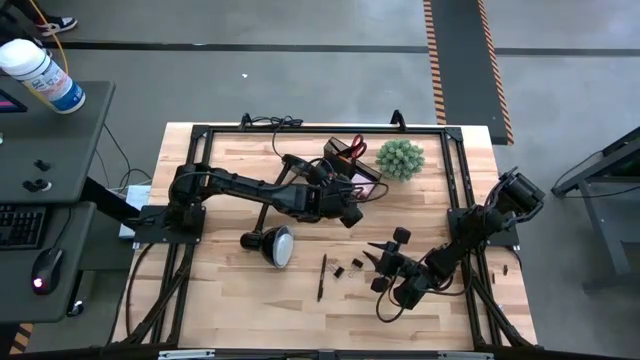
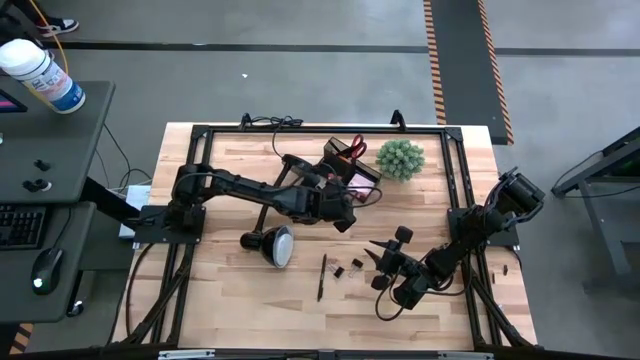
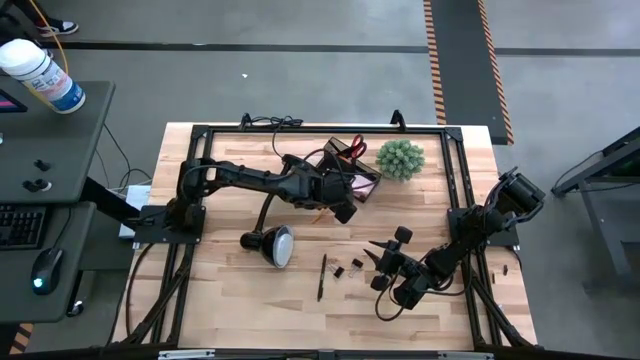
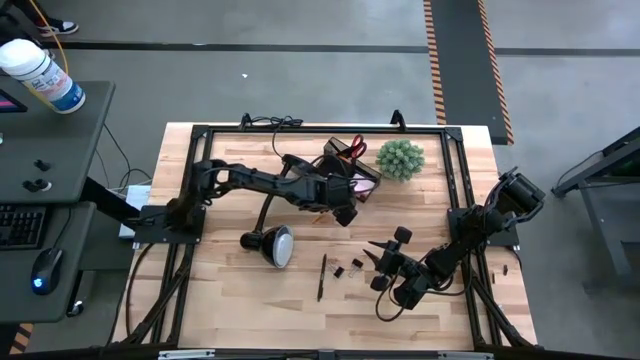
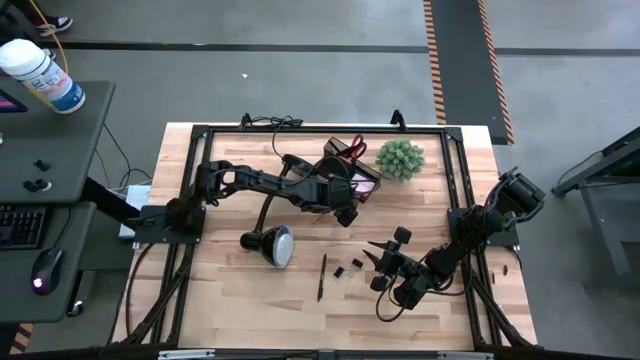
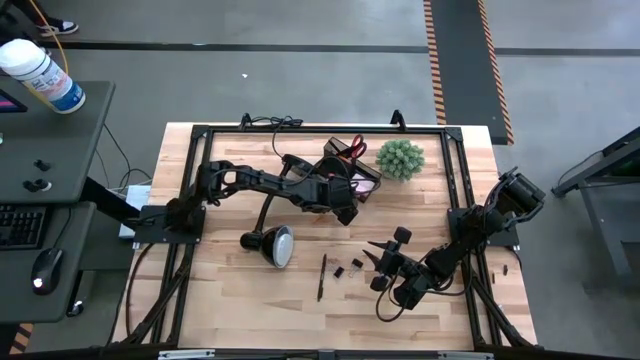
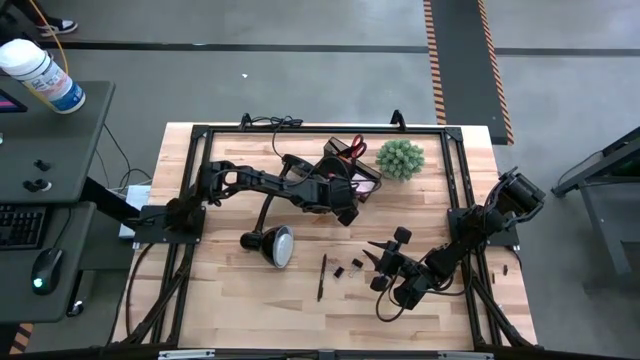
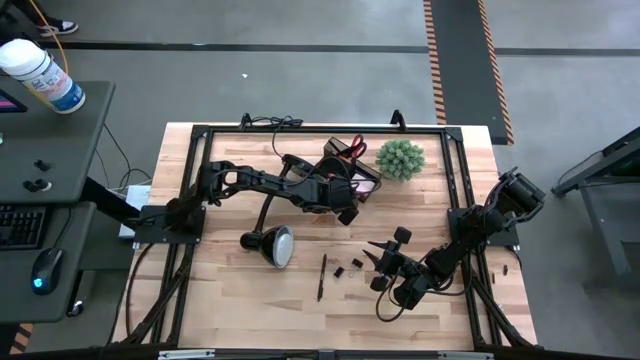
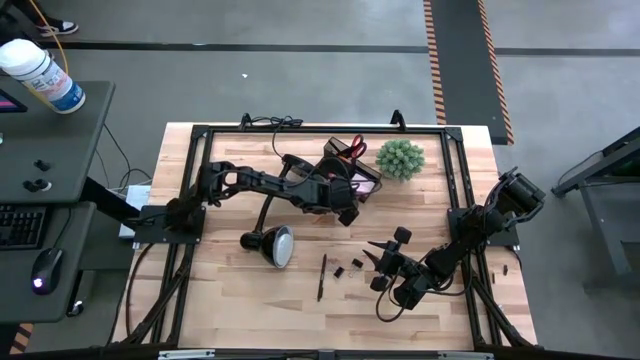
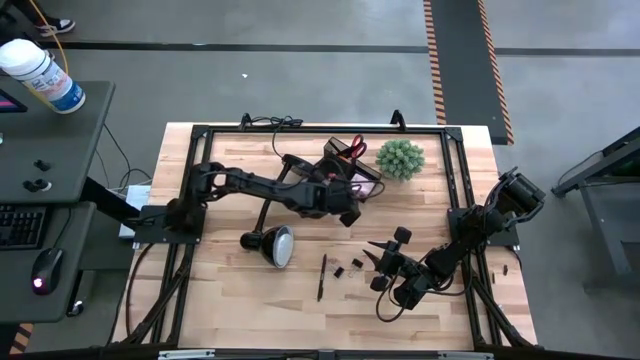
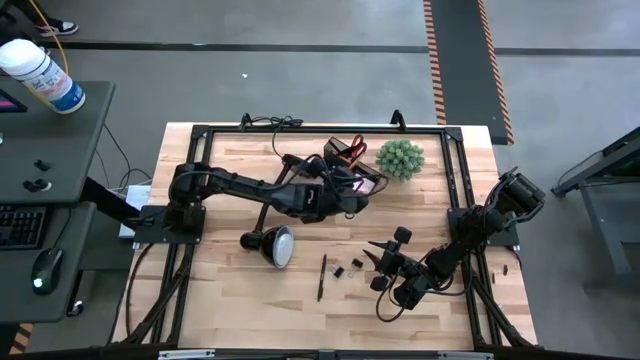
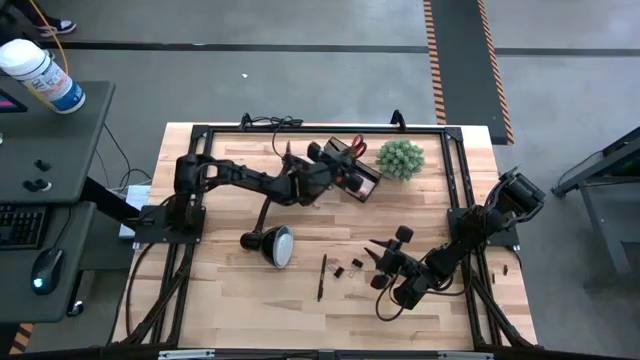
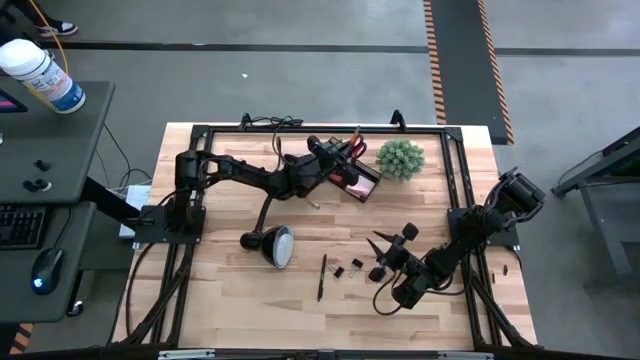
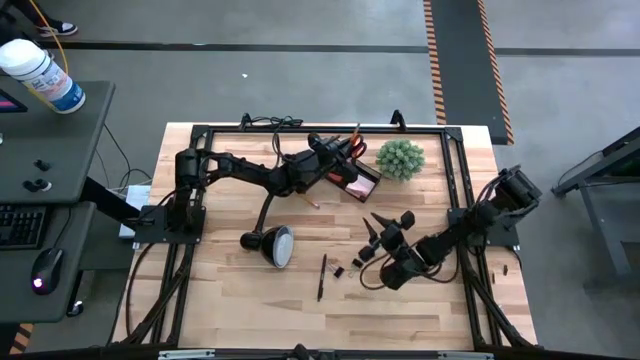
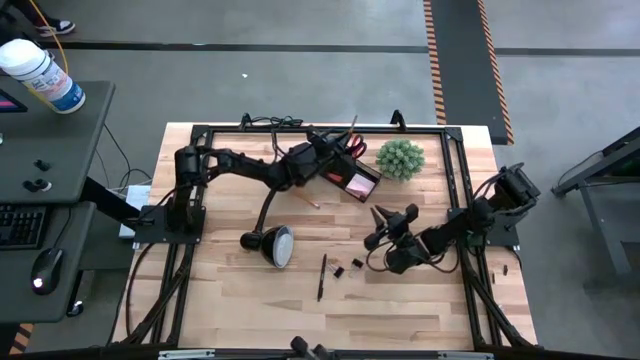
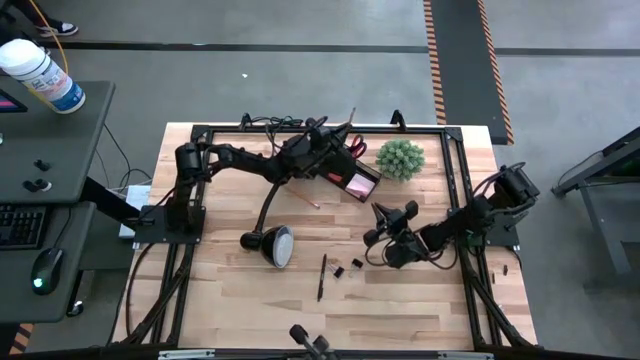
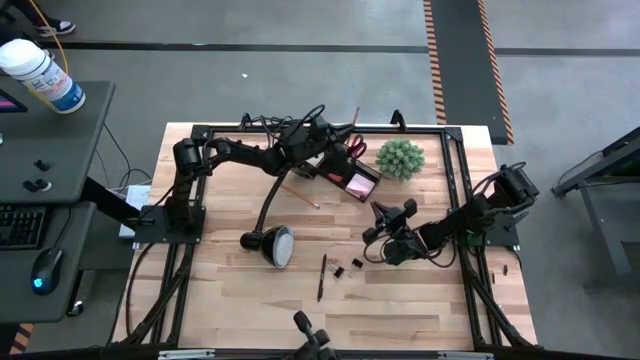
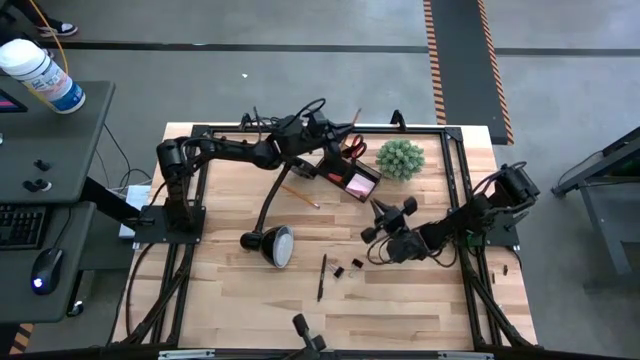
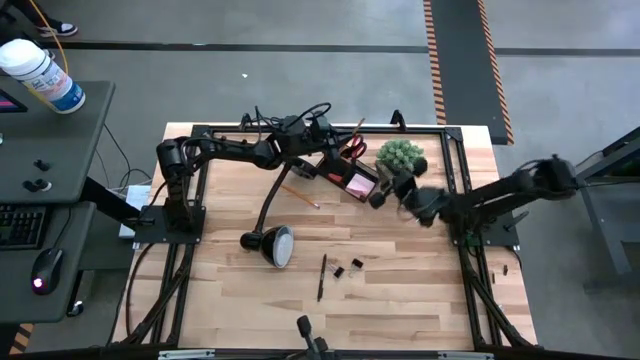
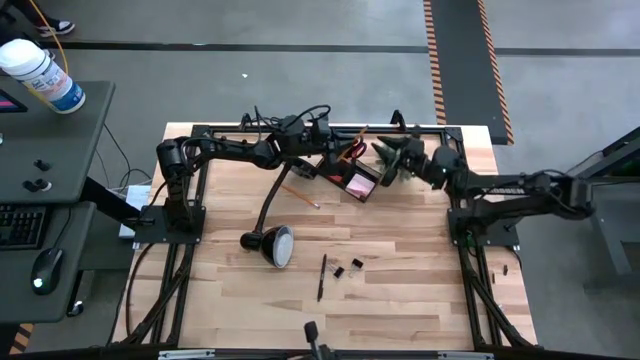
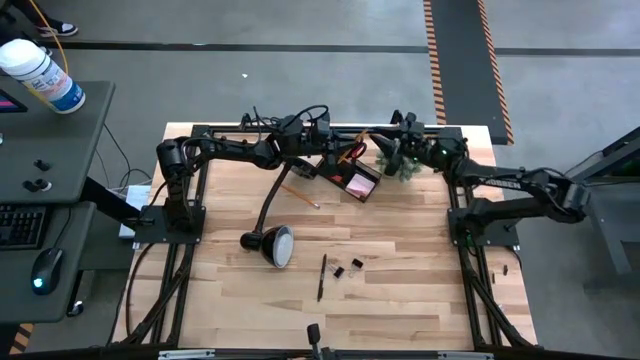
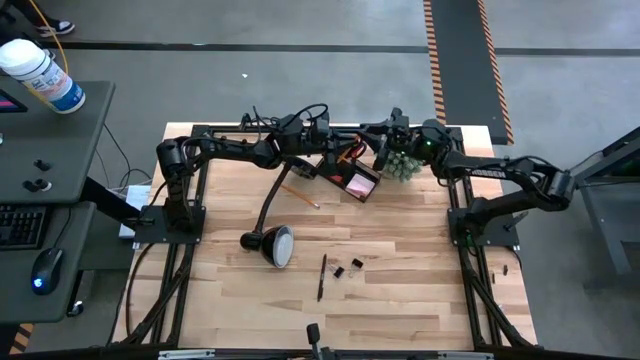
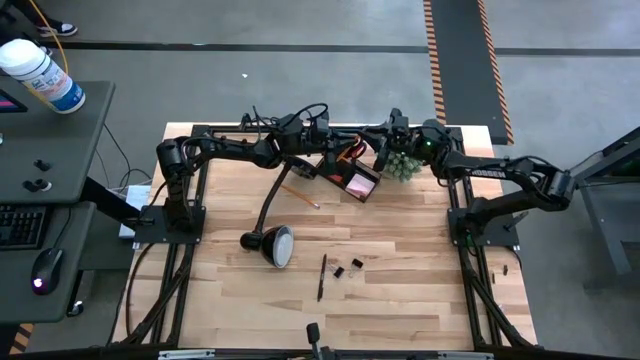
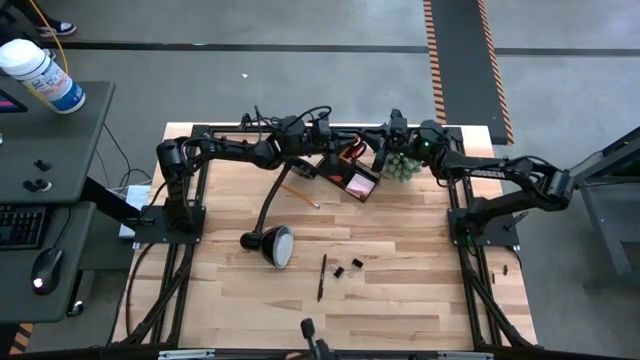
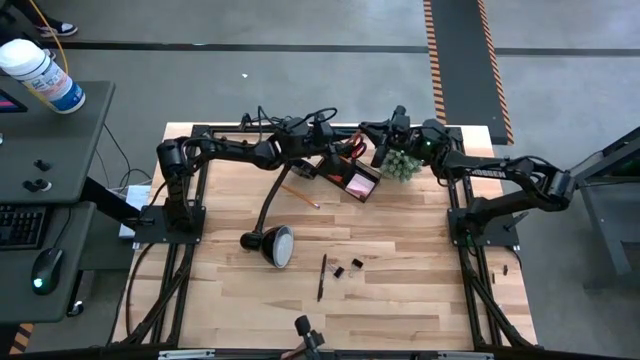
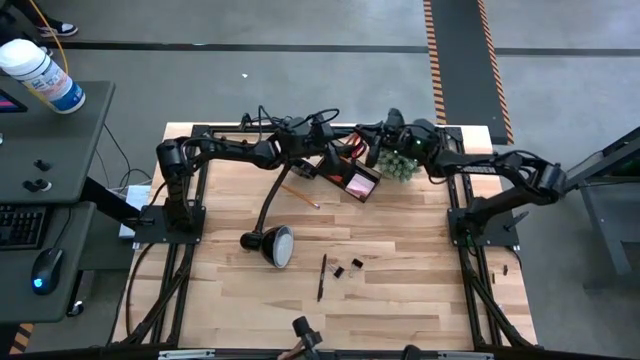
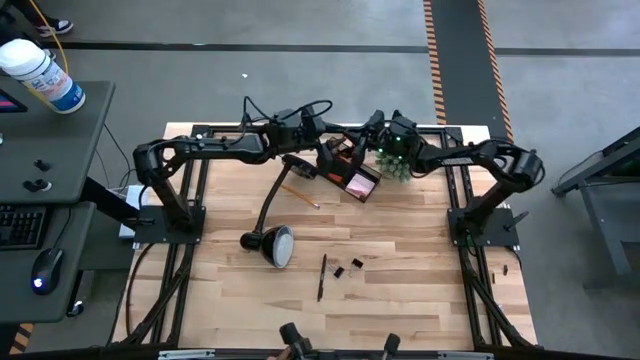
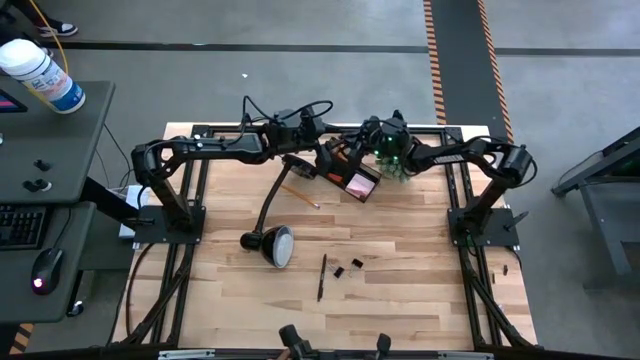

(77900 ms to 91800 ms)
Task: Pick and place office supplies into organizer
Put the bottom orange pencil into the desk organizer

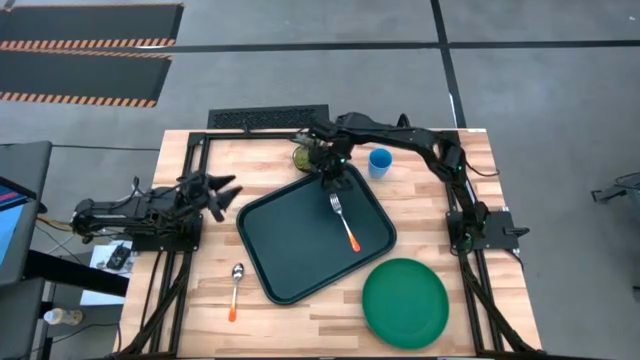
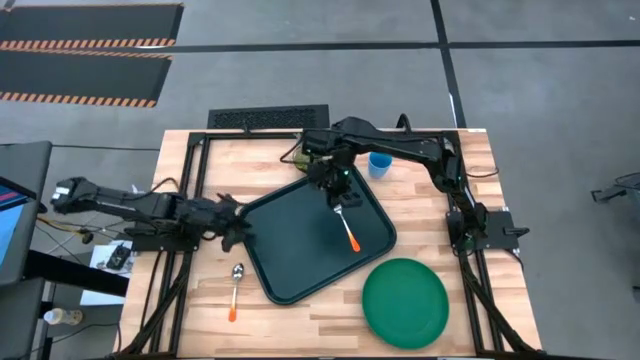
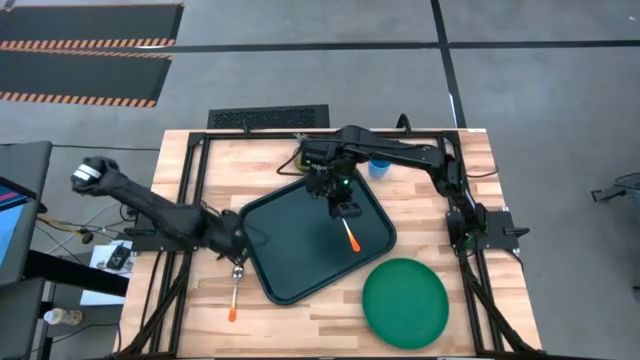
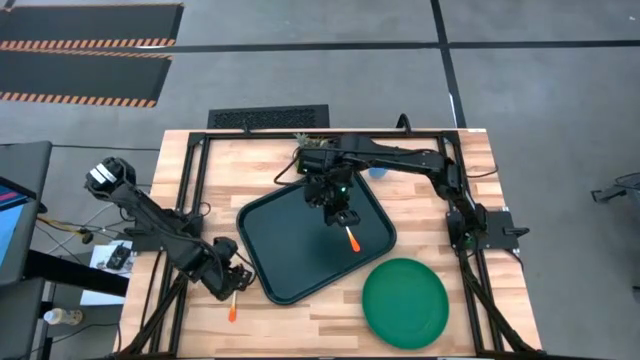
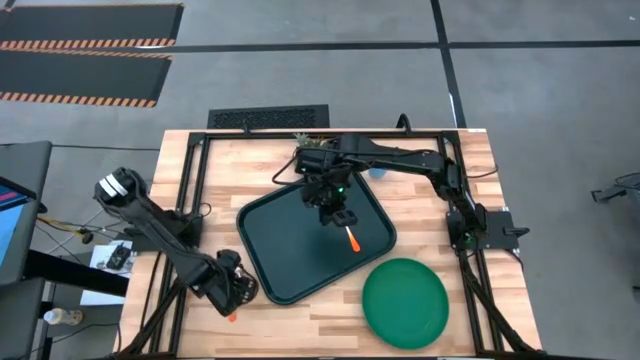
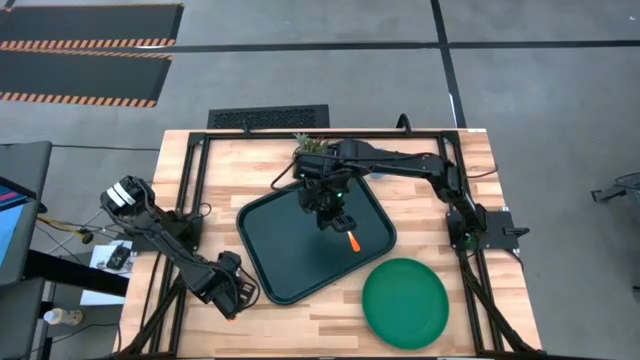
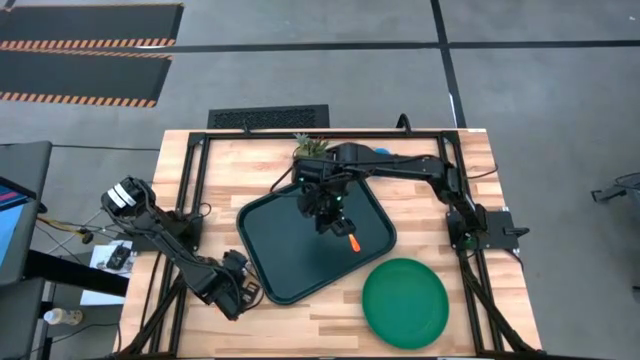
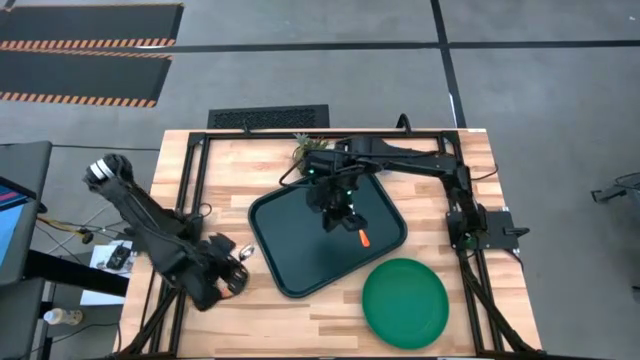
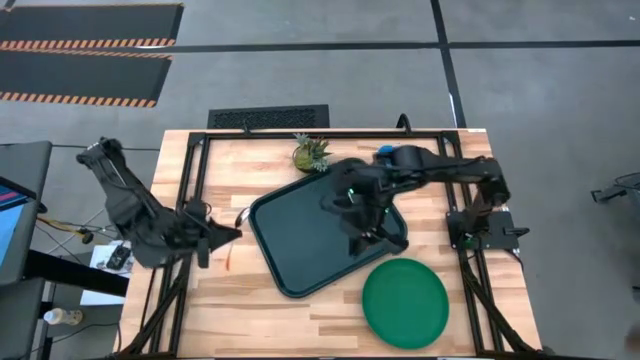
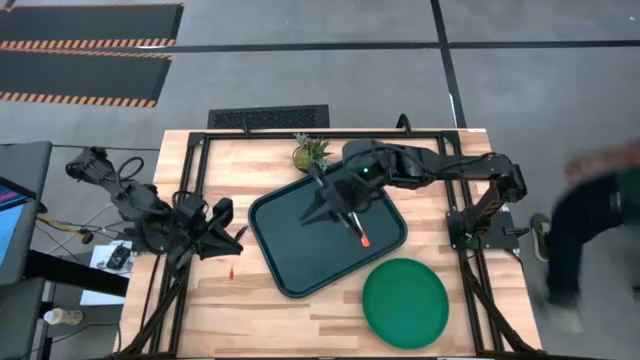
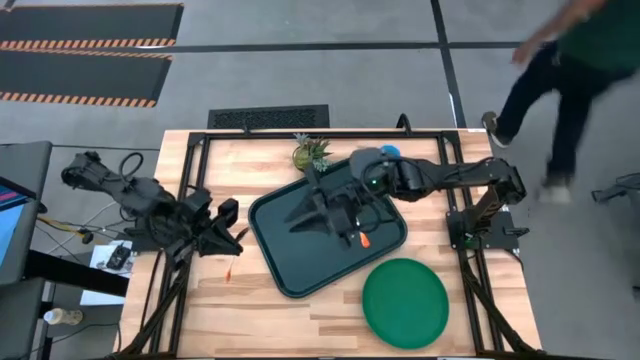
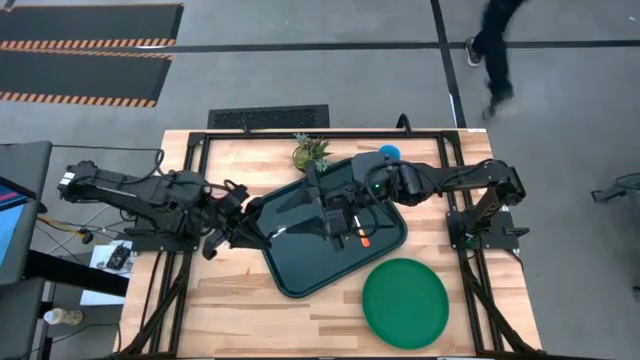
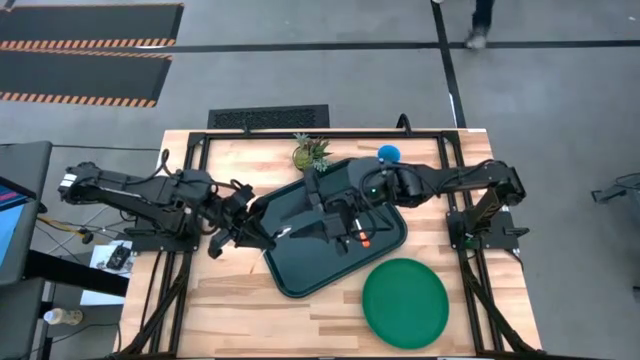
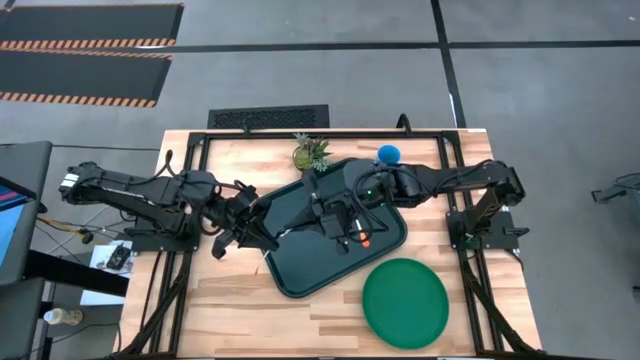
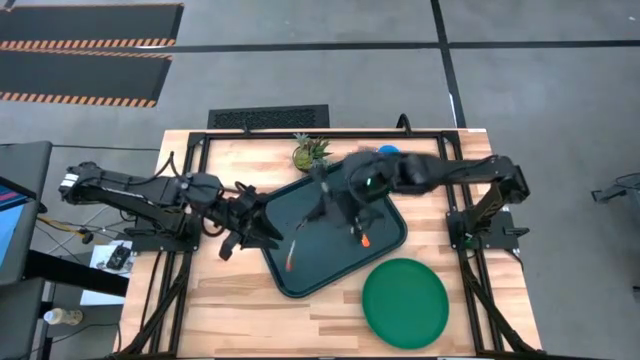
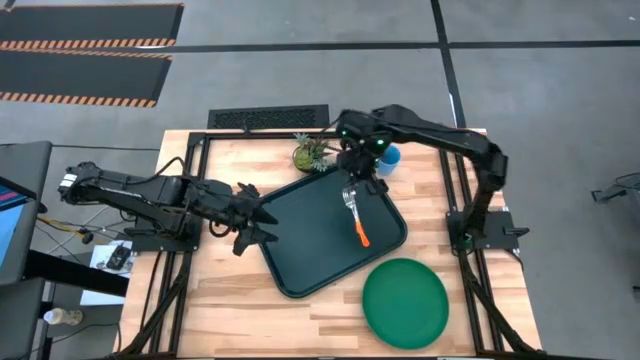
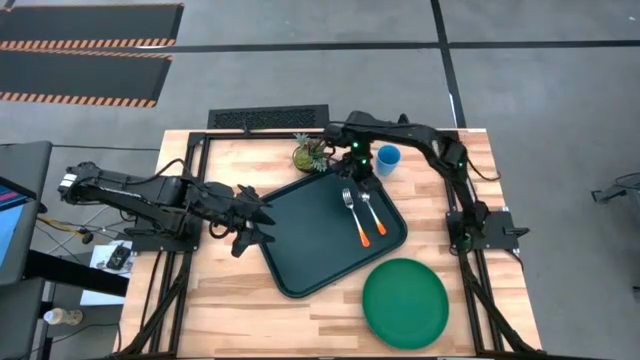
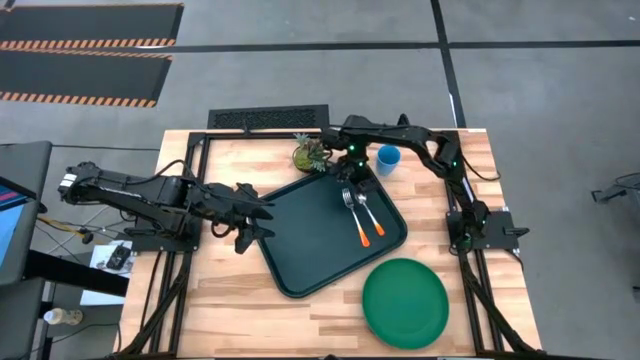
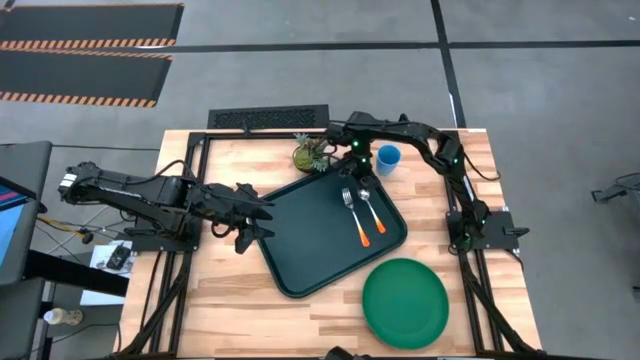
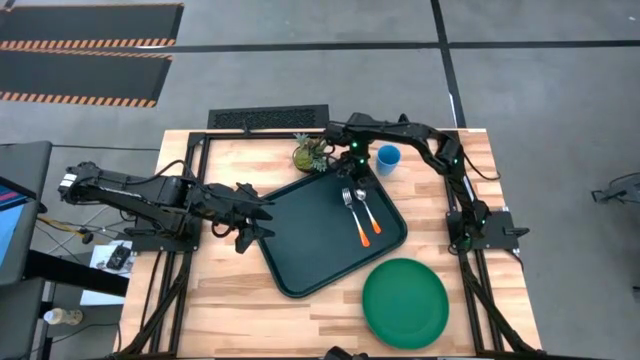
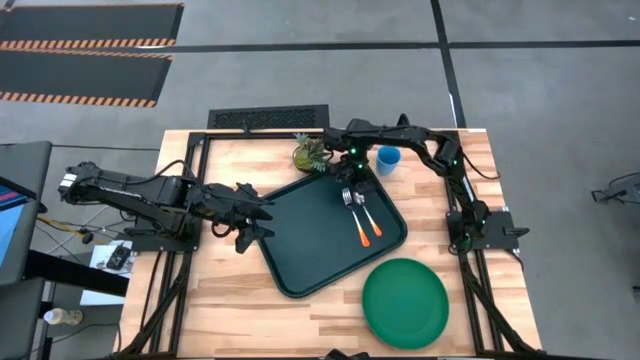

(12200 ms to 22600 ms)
Task: Pick and place plate/cup/fork/spoon on tray
Put the orange spoon on the black serving tray to the left of the orange fork
